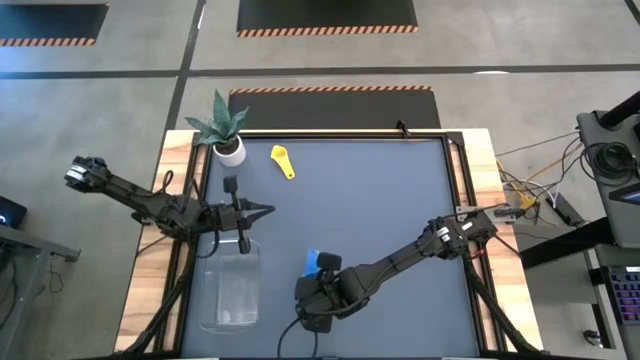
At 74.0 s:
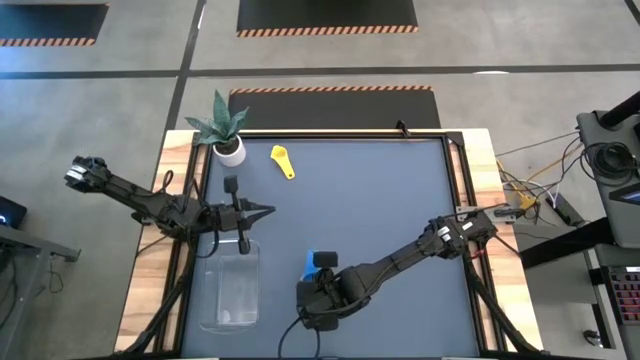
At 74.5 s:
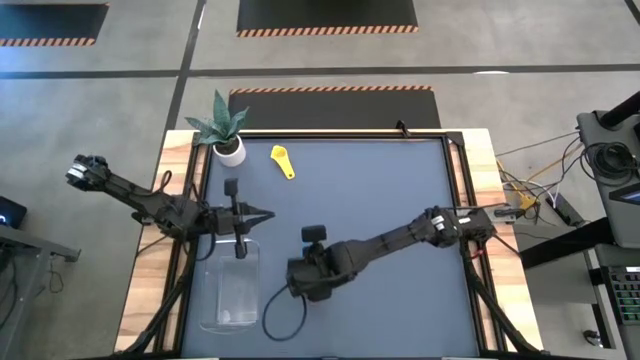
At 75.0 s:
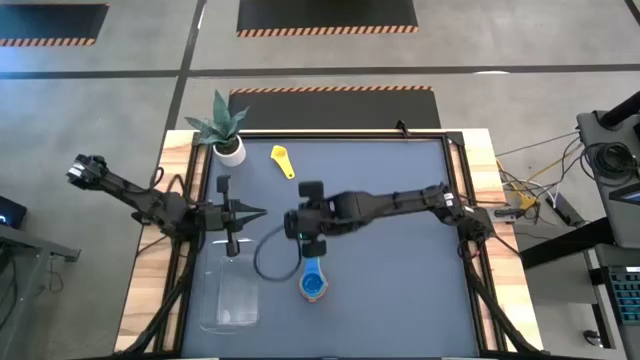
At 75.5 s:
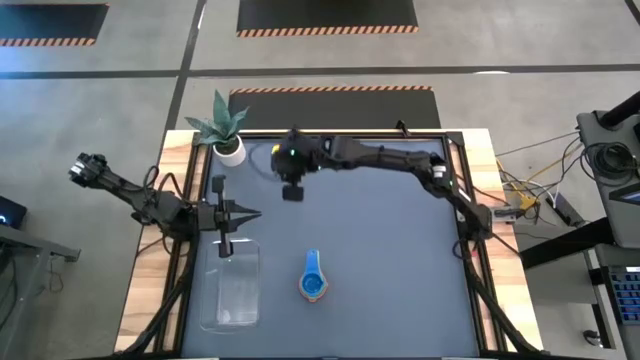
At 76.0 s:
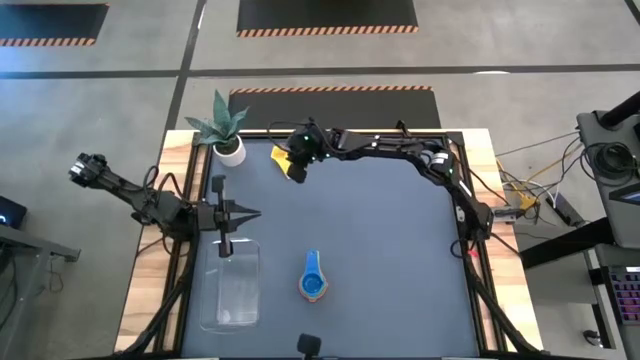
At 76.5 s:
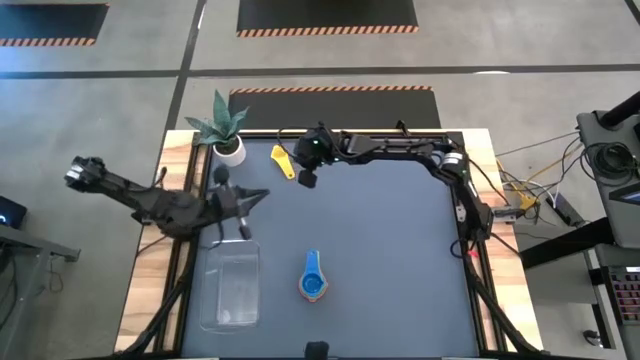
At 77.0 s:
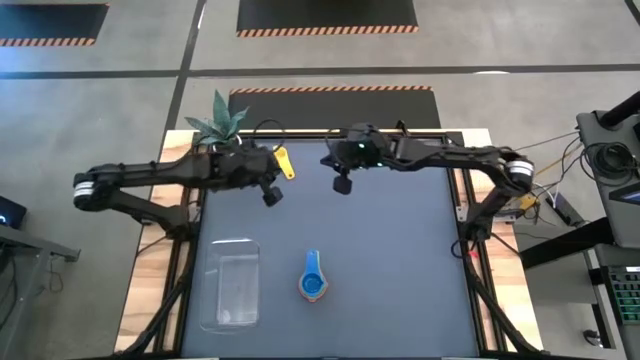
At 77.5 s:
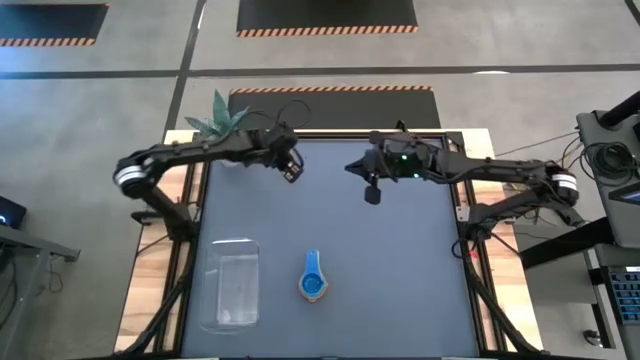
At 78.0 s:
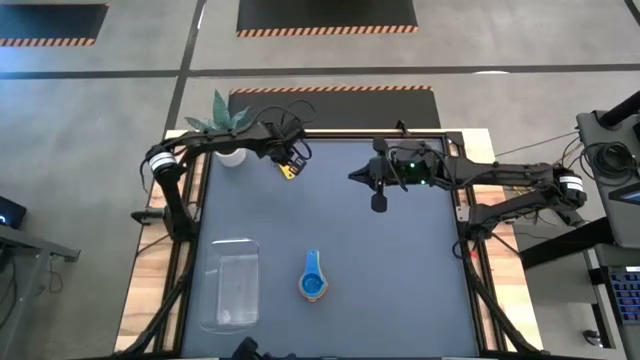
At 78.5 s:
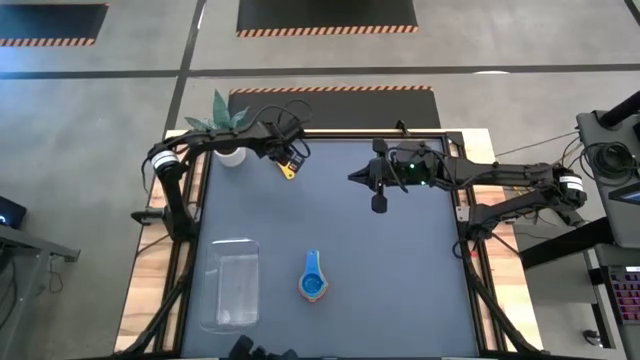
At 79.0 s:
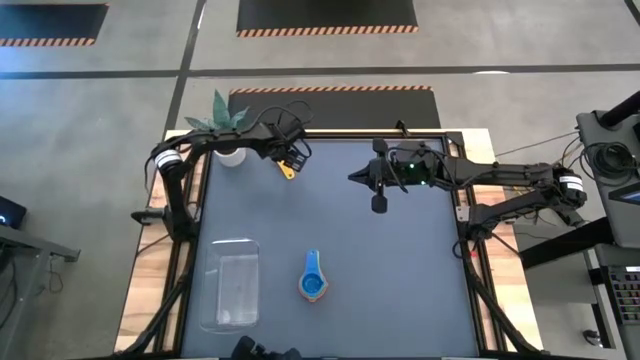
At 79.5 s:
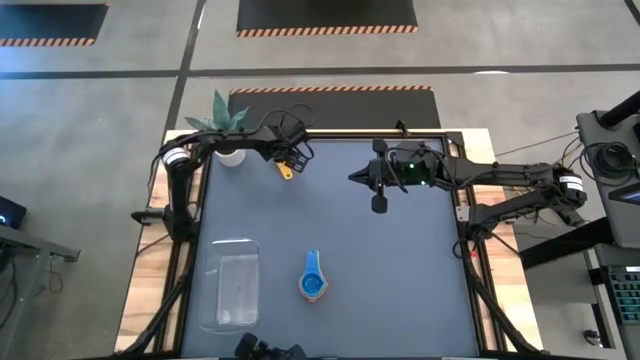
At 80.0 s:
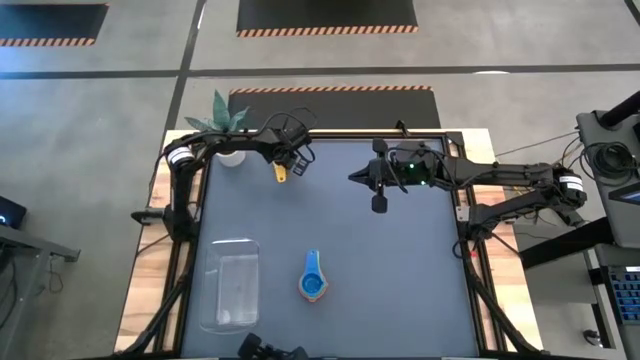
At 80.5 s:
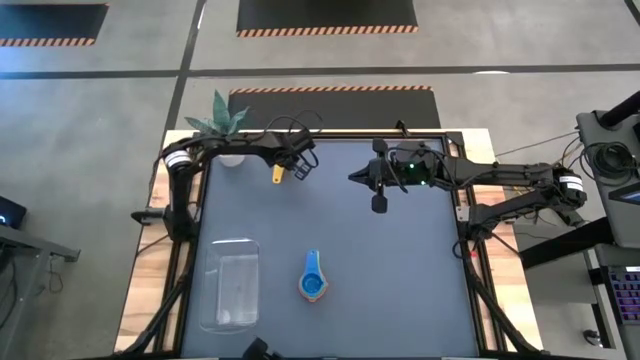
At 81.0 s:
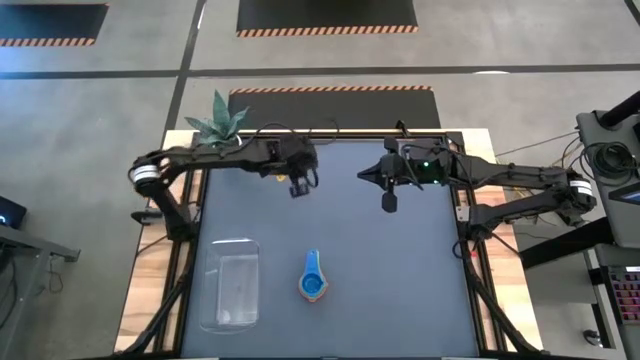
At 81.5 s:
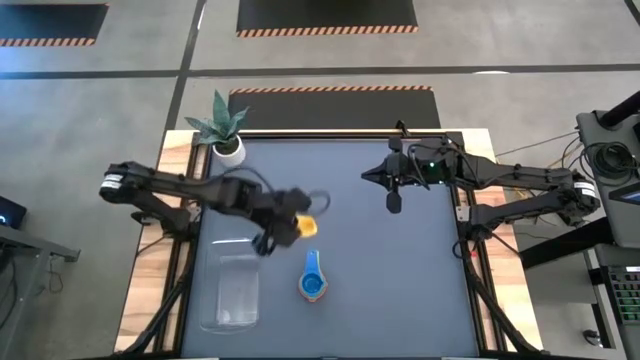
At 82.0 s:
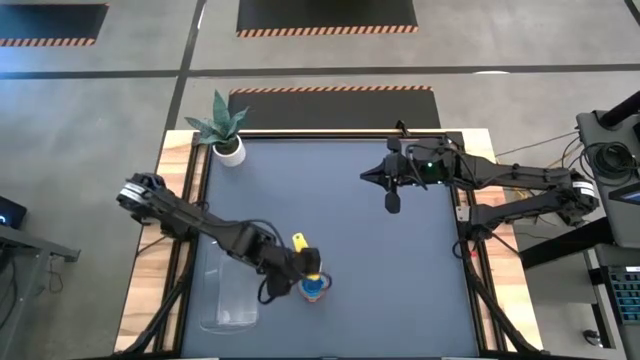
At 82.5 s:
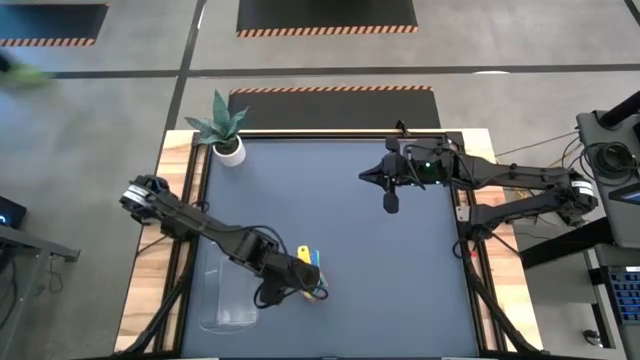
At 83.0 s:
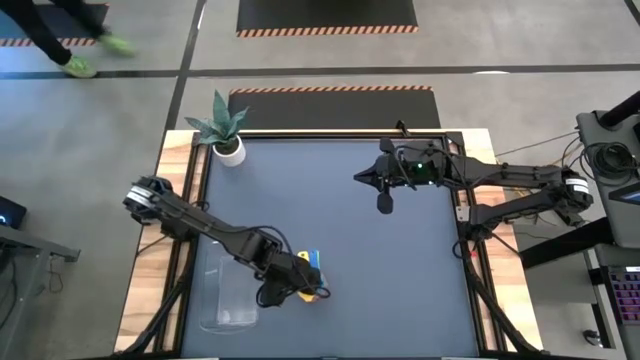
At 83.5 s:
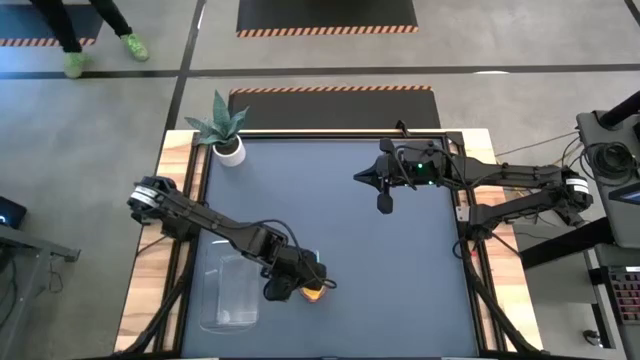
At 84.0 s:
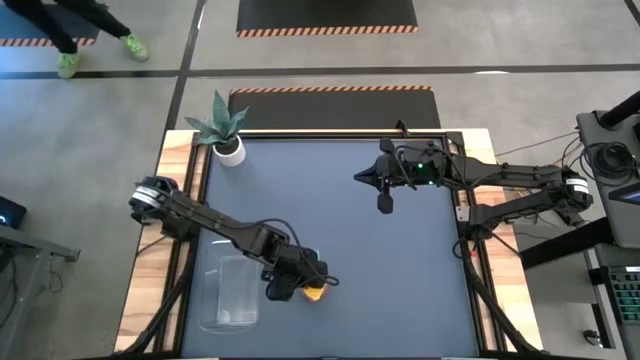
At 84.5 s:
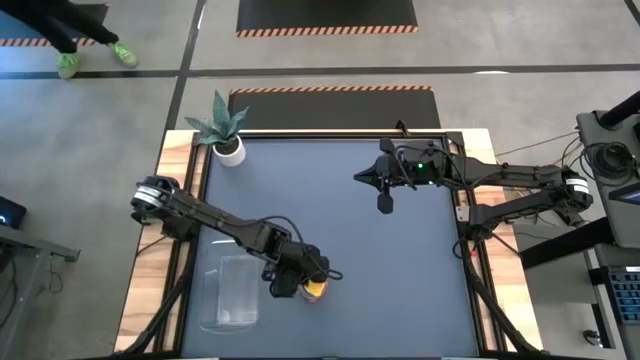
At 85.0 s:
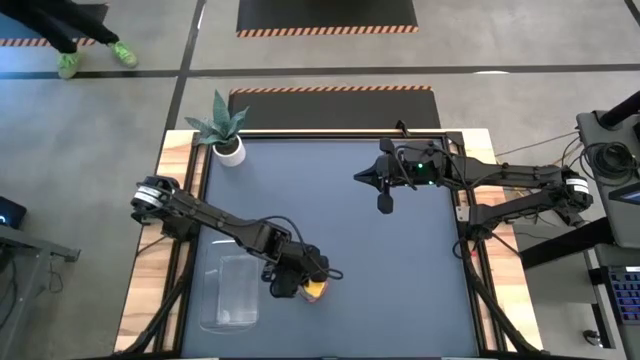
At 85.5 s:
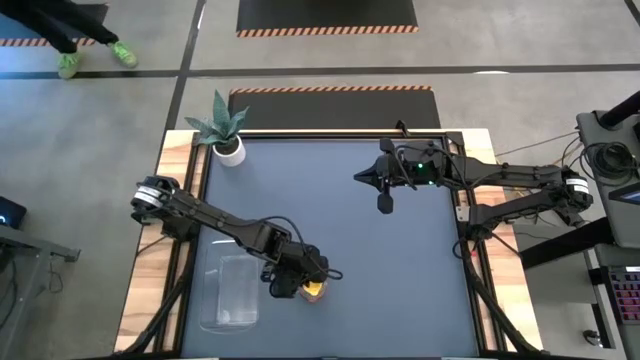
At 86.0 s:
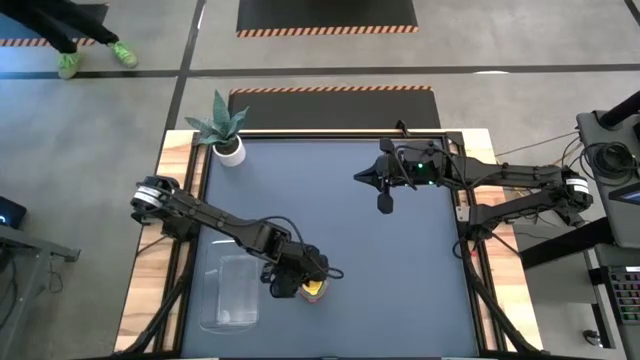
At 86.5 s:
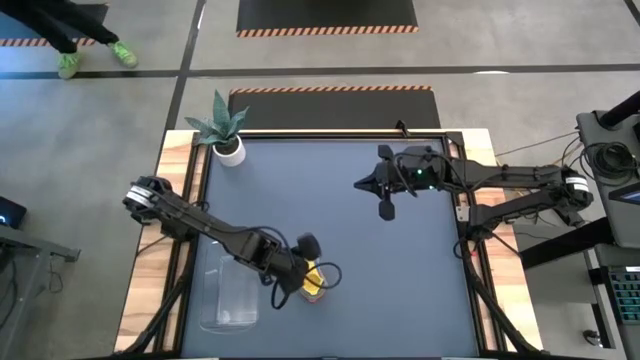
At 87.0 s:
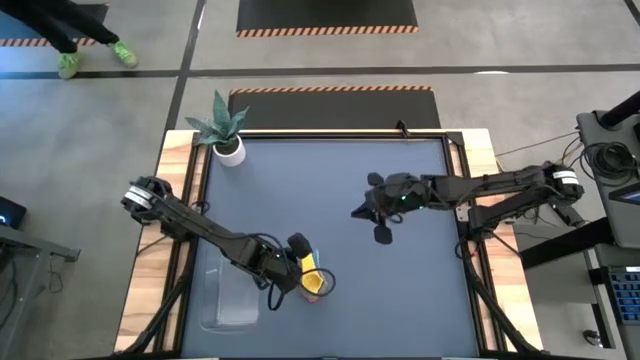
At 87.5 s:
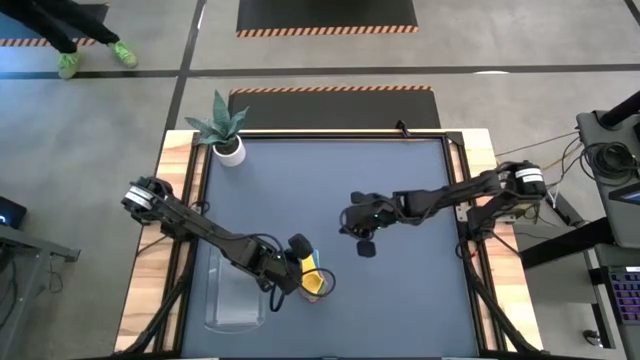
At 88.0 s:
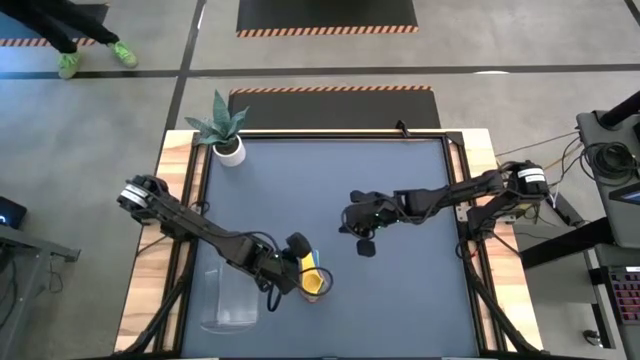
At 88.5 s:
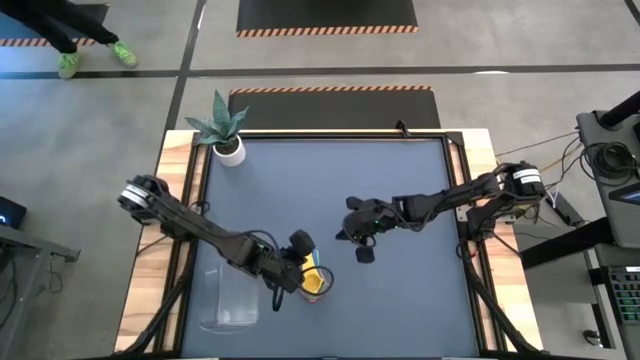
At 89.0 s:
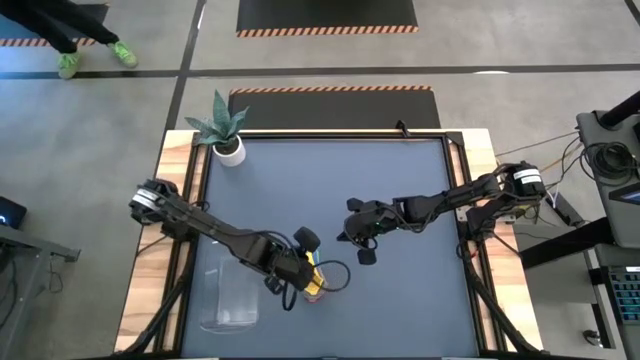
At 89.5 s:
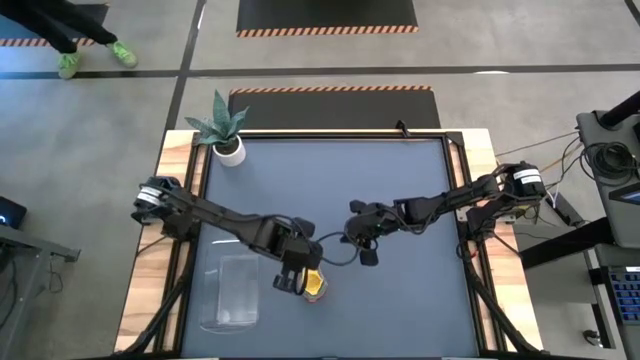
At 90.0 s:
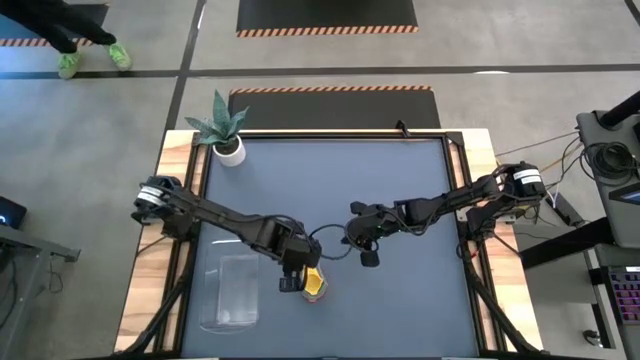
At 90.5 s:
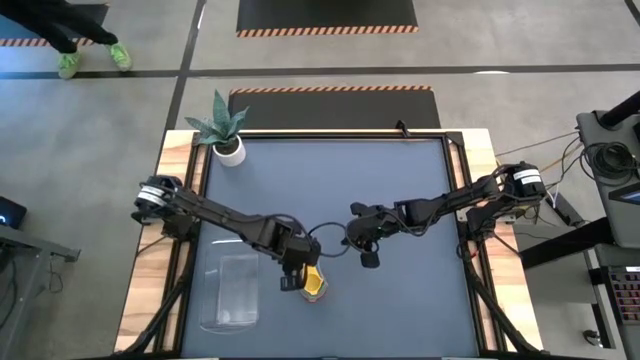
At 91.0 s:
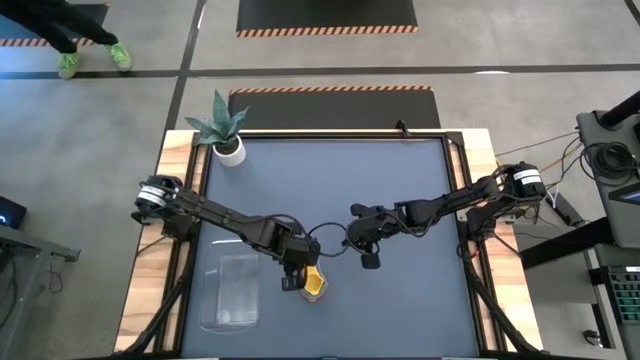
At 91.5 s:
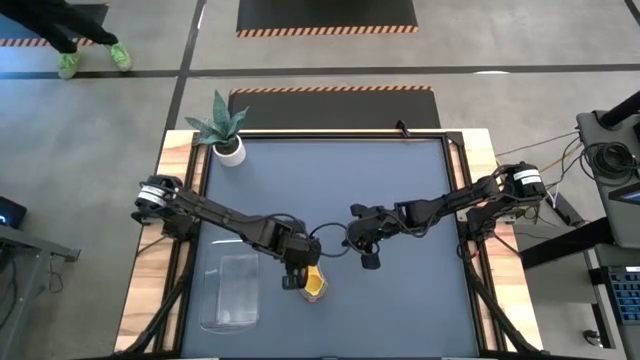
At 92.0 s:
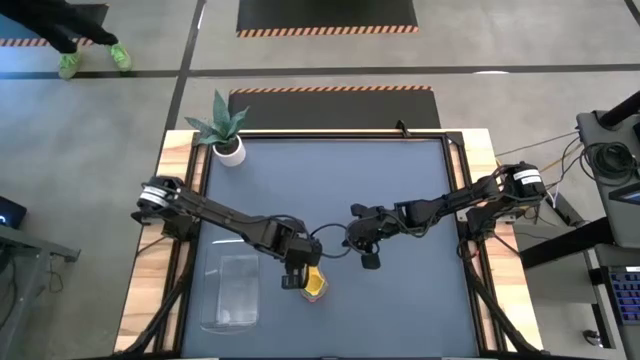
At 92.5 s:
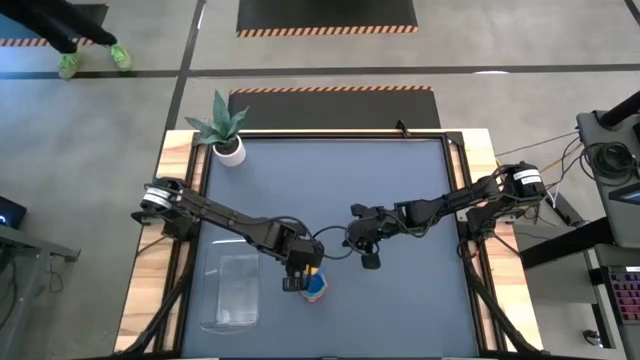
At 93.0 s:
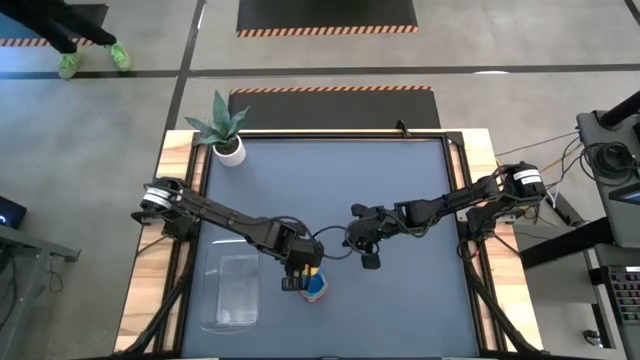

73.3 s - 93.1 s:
Task: Nest measuring cups in basket
Stack the yellow measuring cup on top of the blue measuring cup
